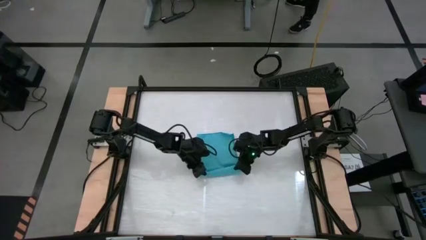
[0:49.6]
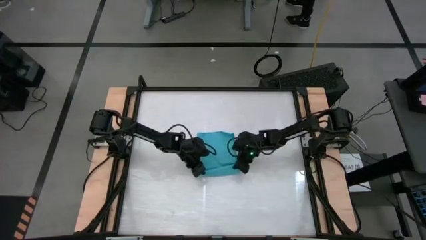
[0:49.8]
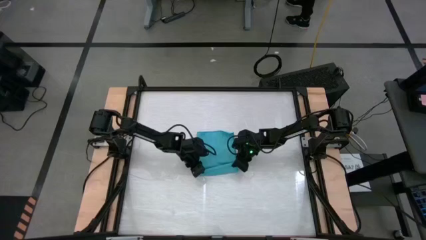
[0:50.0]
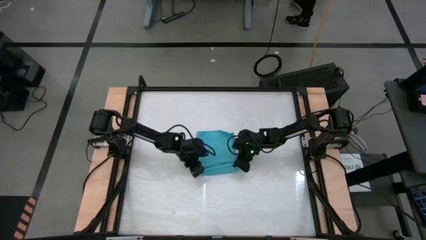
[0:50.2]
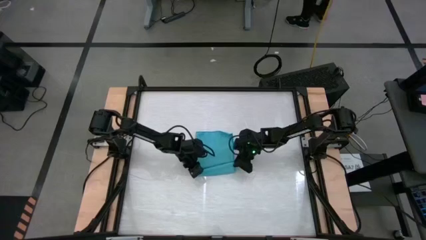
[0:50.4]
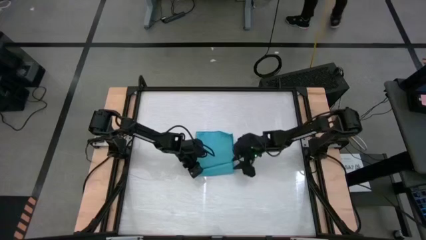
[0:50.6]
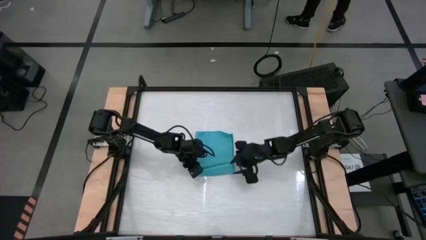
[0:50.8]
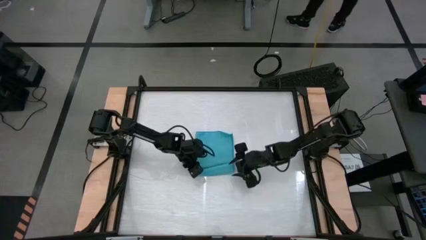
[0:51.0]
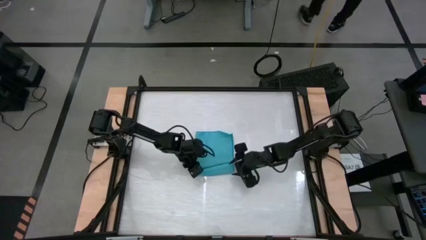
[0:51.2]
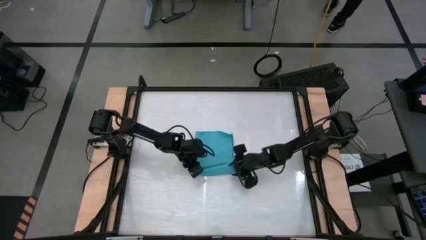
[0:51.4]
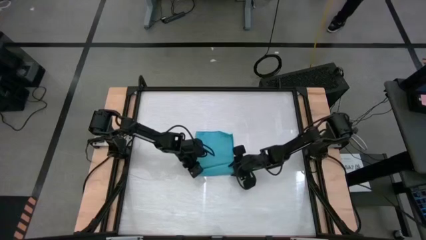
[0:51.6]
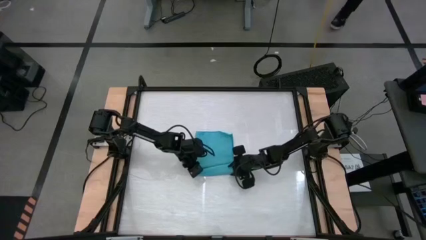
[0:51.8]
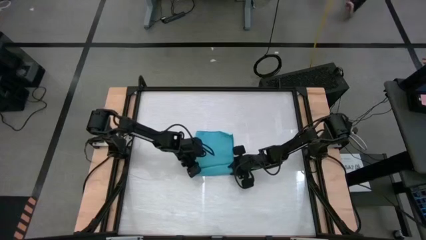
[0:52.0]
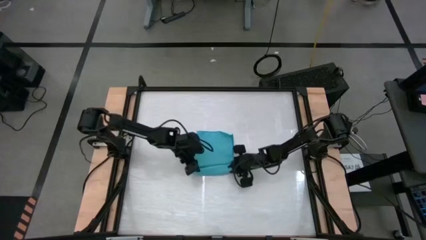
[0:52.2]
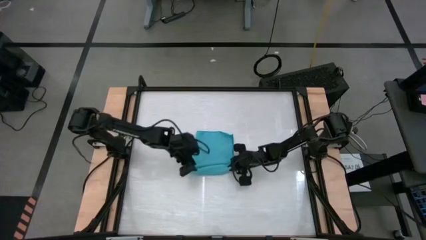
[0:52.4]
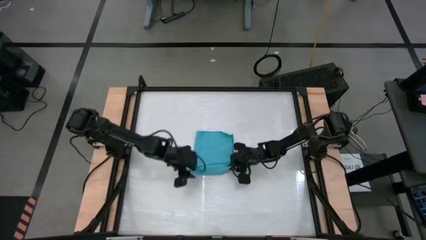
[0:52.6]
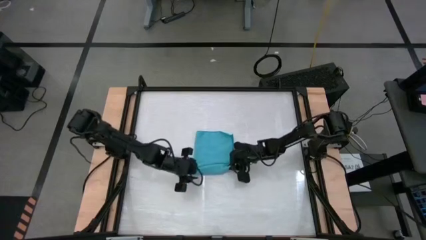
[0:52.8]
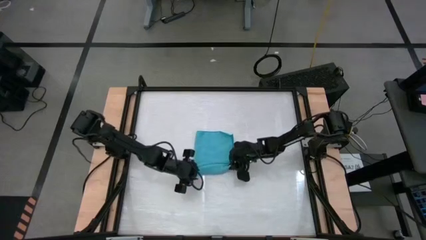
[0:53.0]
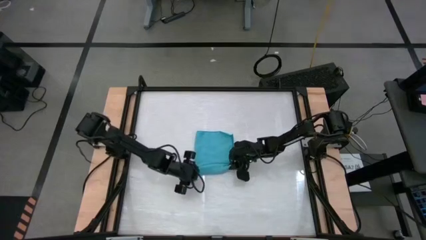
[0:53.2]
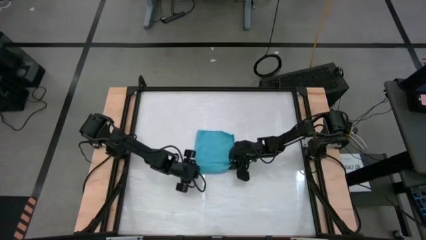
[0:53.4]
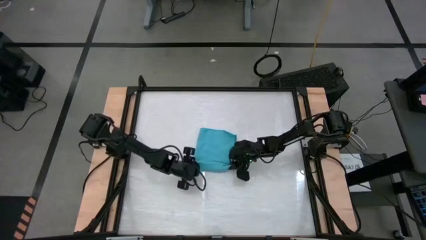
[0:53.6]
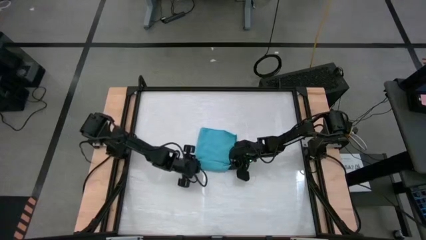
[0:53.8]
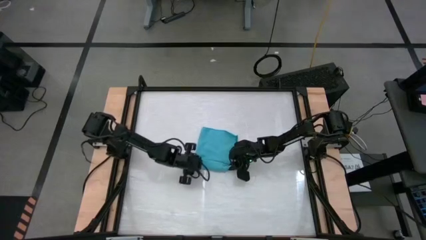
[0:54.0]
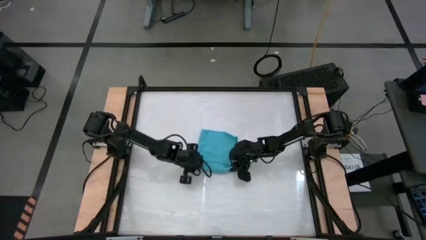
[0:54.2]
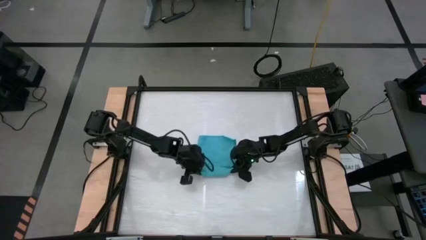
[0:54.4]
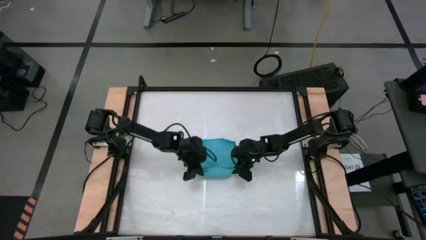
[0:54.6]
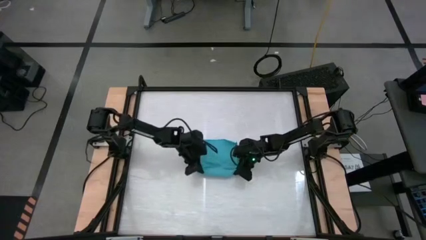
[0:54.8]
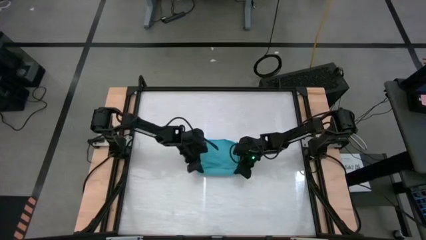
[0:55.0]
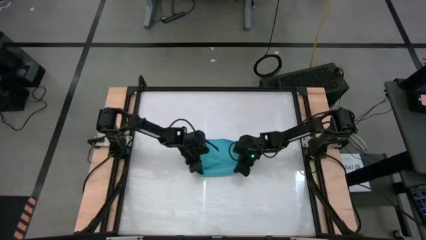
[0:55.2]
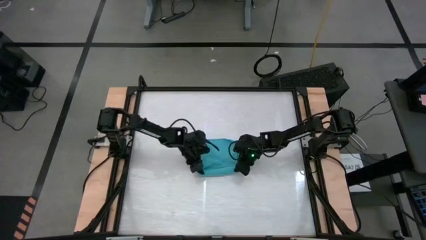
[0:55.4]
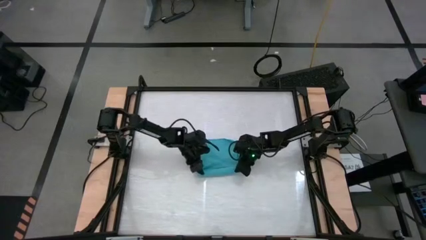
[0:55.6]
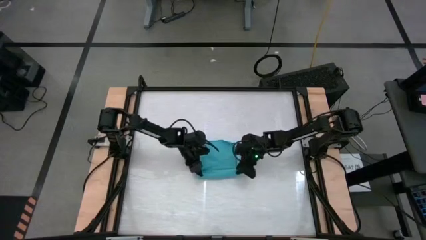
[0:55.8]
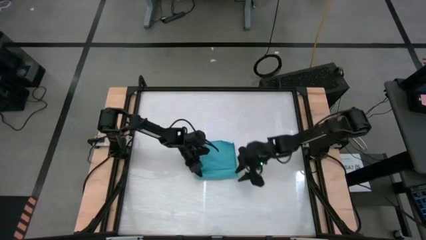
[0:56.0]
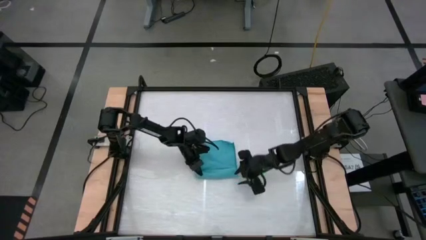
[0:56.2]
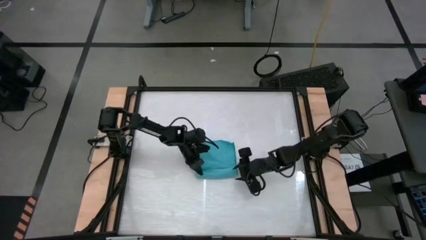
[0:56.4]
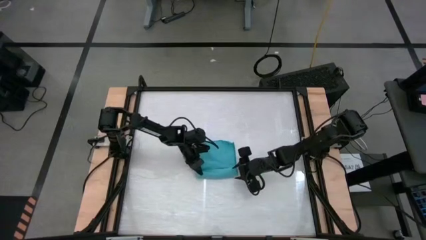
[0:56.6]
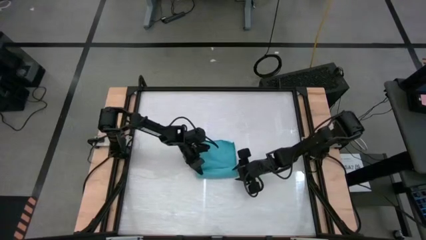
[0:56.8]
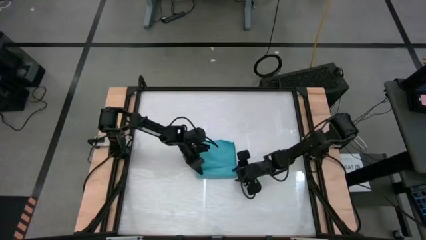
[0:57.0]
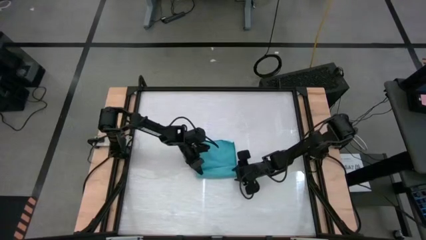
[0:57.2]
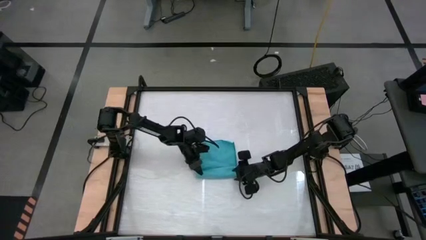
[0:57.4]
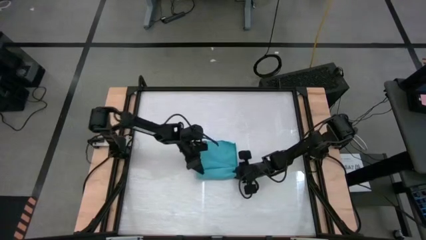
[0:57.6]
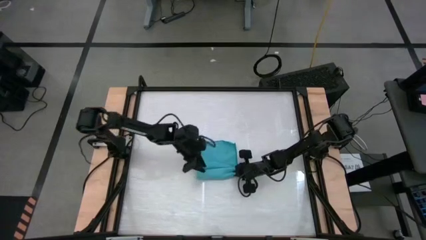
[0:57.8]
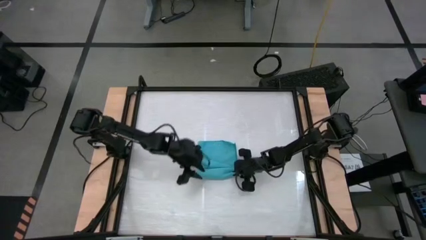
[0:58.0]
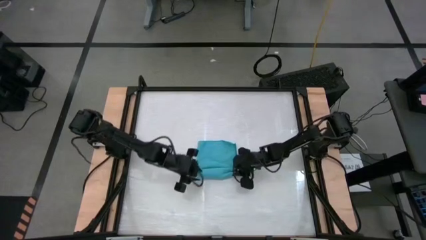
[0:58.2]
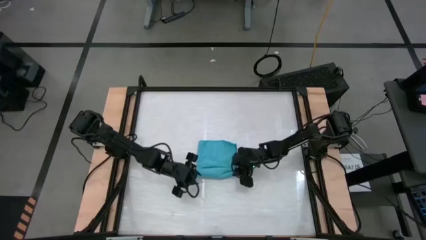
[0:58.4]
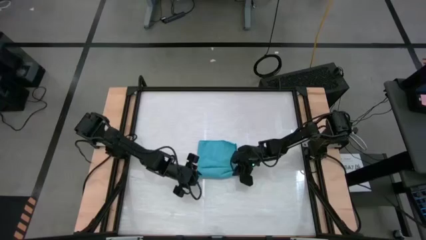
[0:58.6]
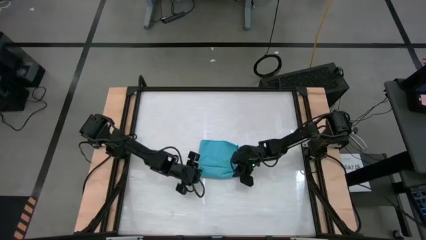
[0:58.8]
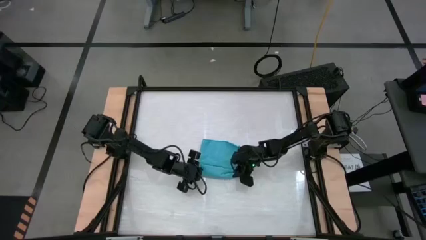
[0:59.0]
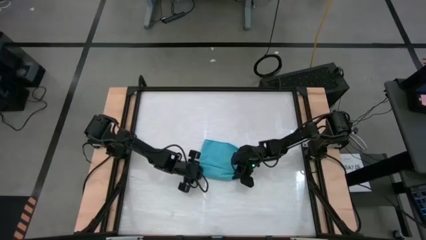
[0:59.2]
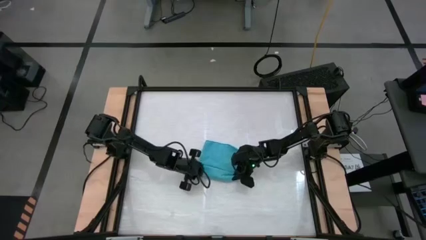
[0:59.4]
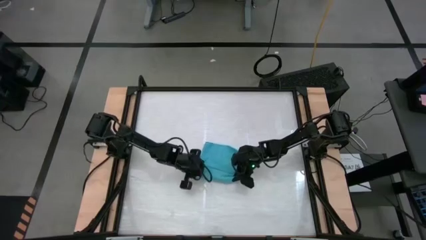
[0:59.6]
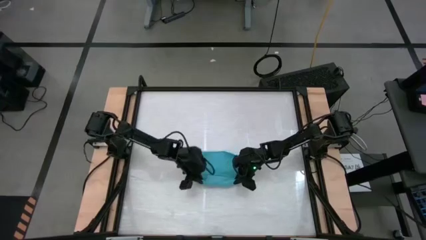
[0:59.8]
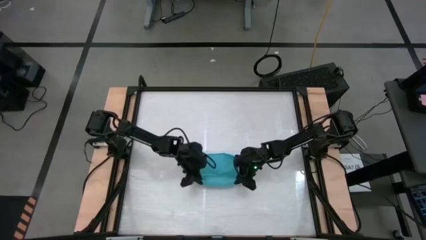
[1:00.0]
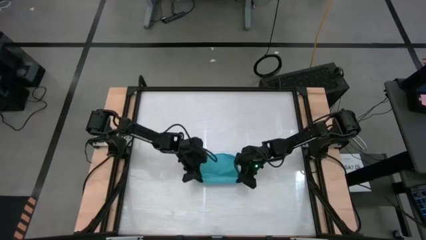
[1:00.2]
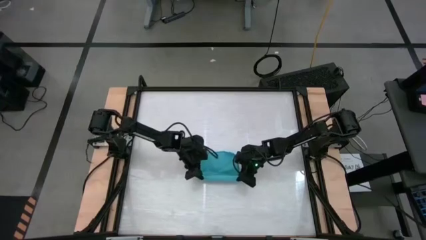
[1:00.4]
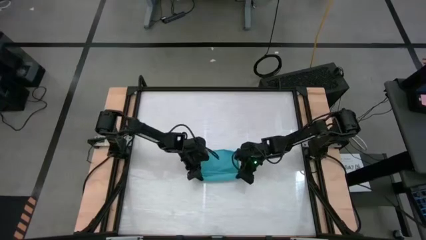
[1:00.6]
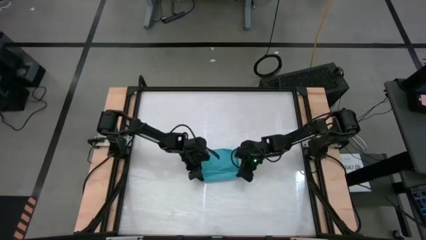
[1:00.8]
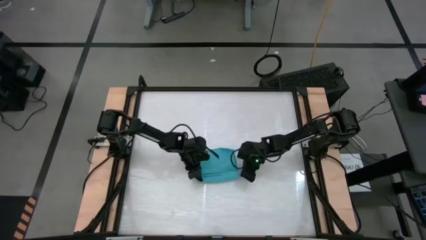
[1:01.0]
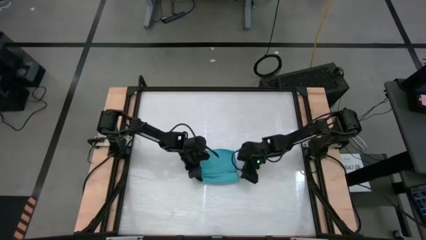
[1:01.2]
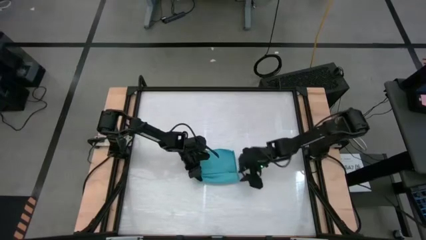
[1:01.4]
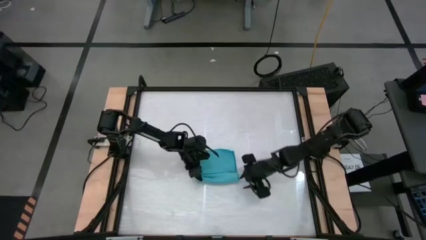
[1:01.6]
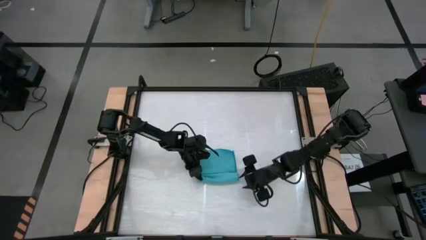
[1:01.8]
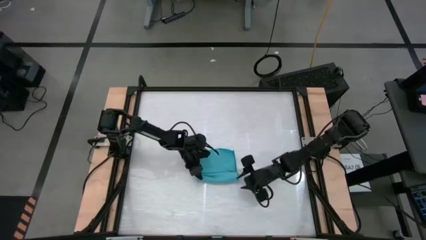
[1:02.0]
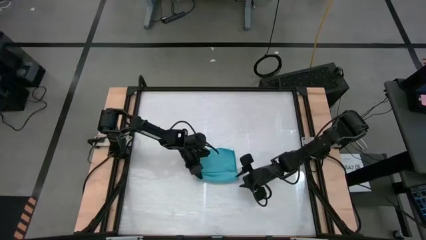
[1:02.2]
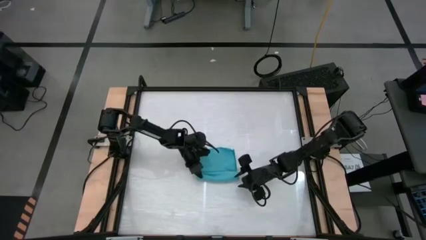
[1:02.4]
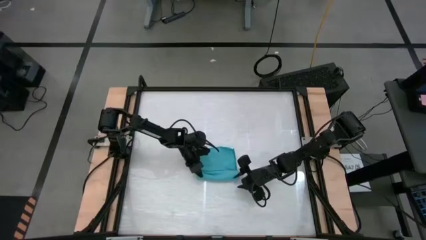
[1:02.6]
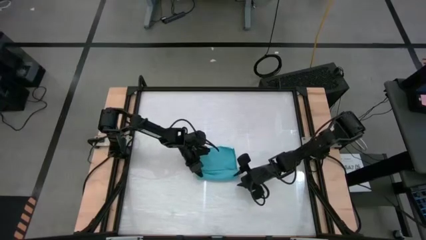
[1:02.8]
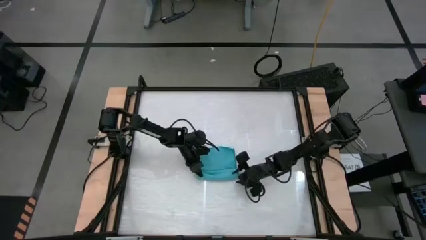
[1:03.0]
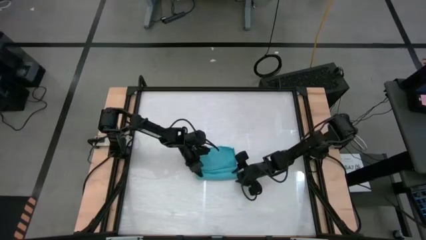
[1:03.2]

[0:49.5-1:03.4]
Task: Roll towel
Roll the light blue towel
